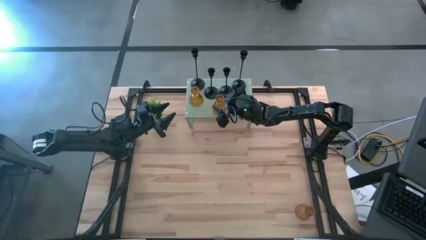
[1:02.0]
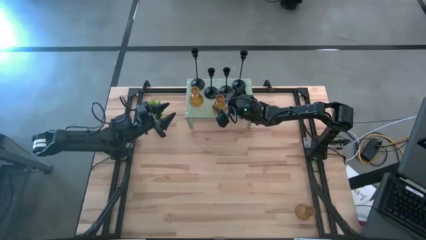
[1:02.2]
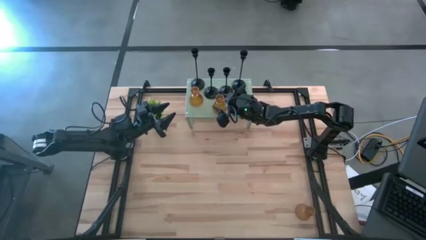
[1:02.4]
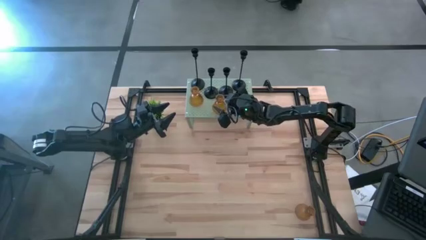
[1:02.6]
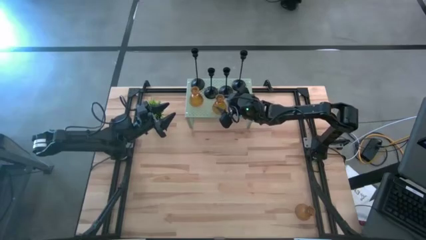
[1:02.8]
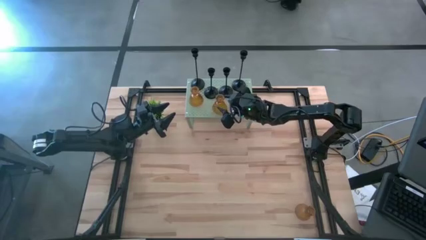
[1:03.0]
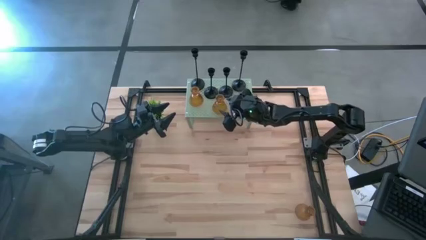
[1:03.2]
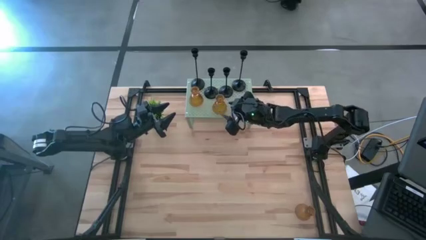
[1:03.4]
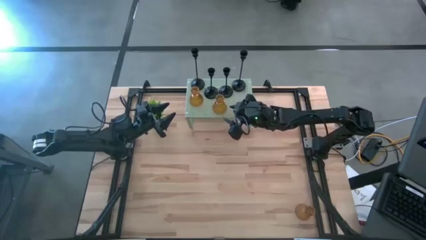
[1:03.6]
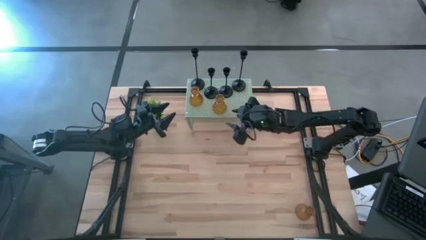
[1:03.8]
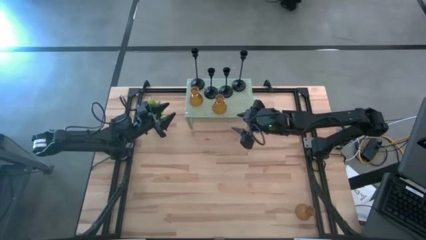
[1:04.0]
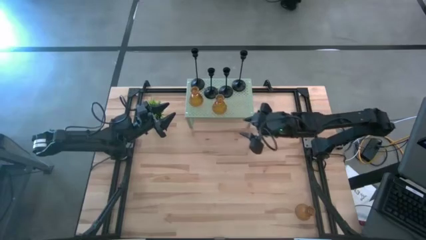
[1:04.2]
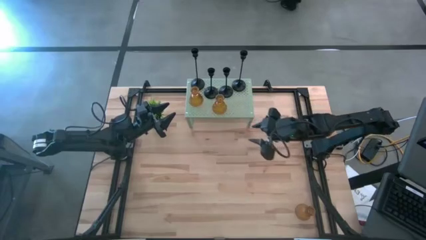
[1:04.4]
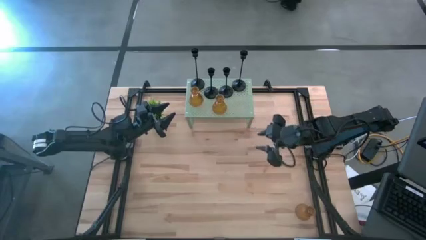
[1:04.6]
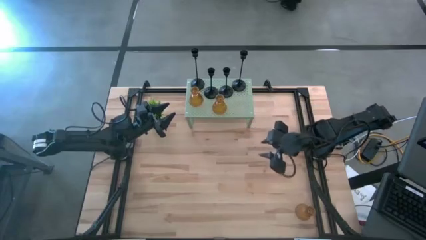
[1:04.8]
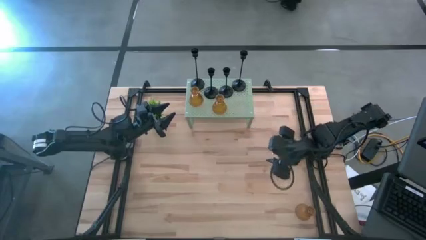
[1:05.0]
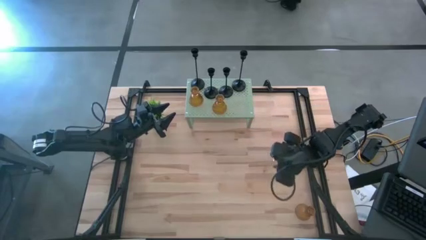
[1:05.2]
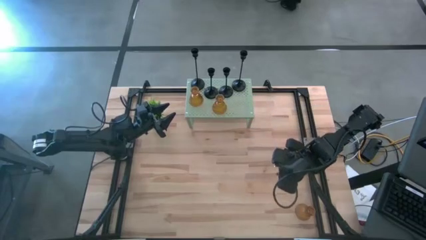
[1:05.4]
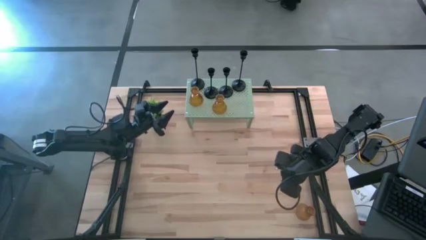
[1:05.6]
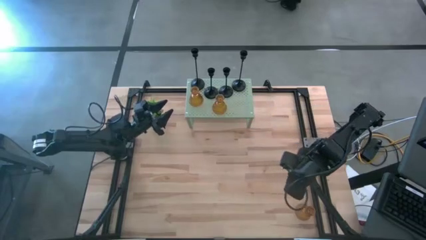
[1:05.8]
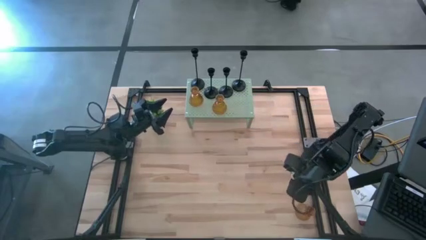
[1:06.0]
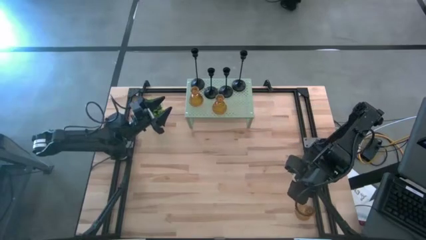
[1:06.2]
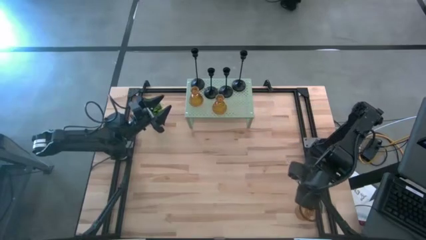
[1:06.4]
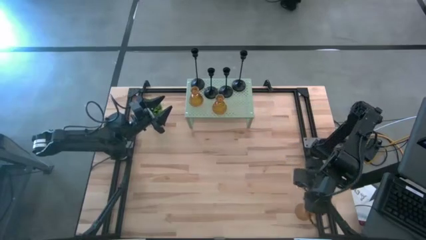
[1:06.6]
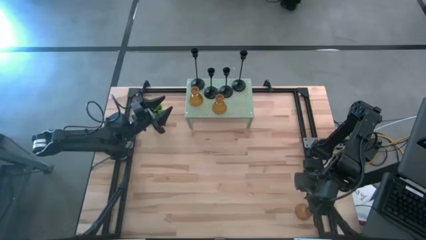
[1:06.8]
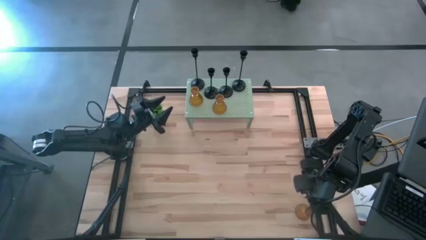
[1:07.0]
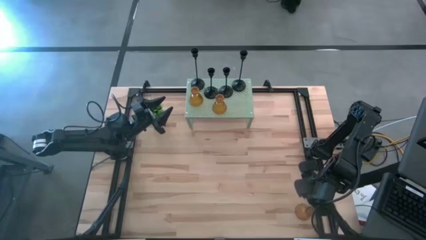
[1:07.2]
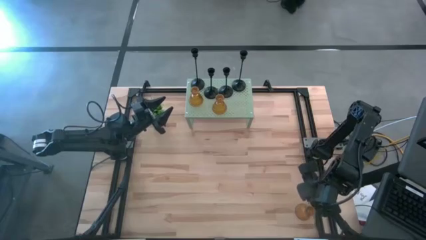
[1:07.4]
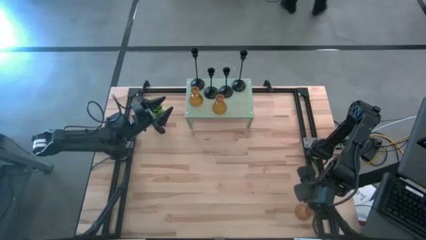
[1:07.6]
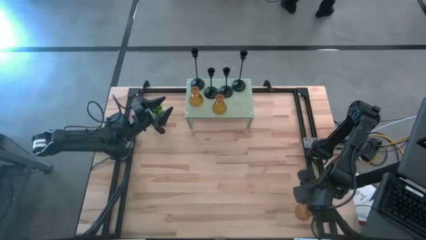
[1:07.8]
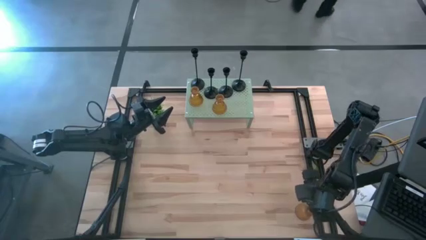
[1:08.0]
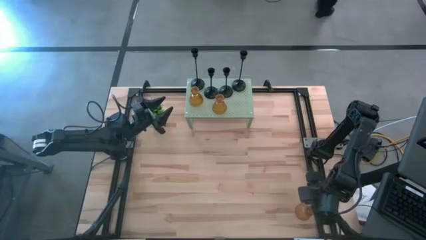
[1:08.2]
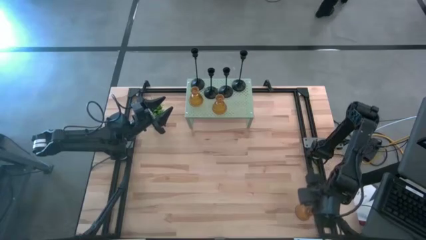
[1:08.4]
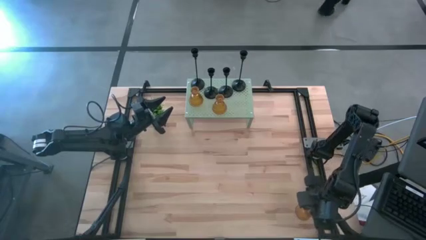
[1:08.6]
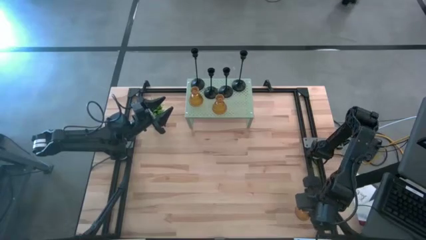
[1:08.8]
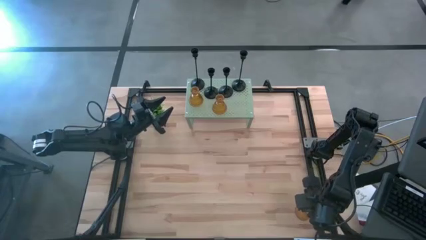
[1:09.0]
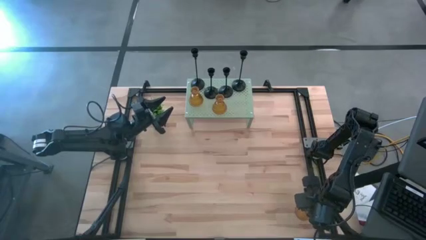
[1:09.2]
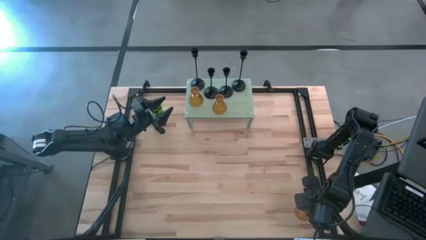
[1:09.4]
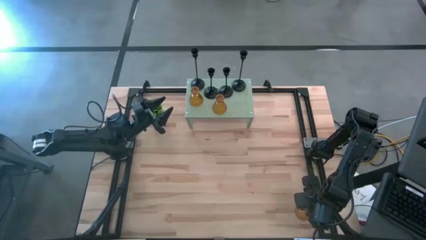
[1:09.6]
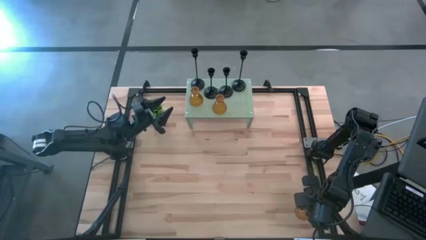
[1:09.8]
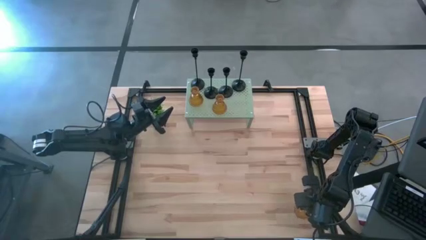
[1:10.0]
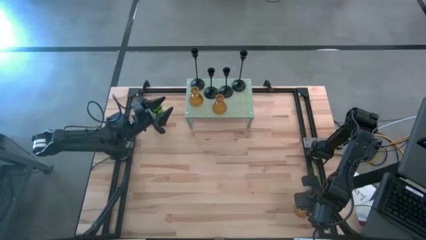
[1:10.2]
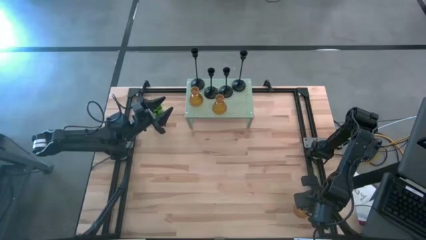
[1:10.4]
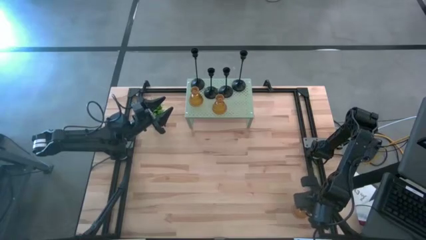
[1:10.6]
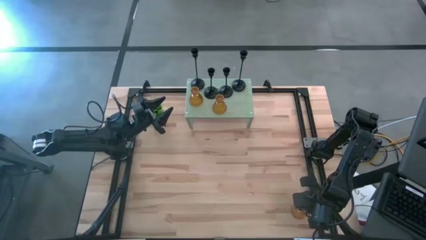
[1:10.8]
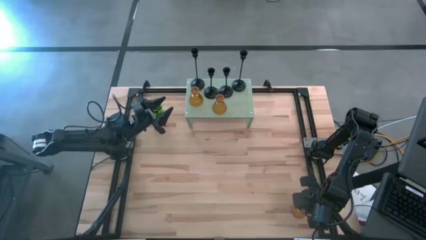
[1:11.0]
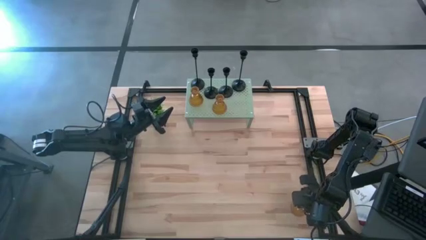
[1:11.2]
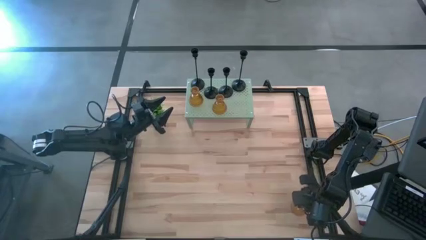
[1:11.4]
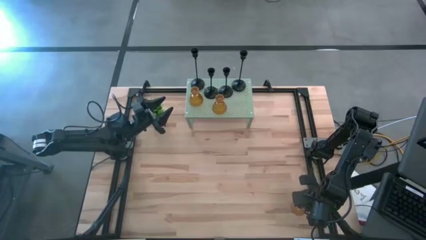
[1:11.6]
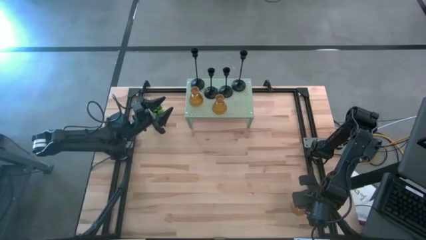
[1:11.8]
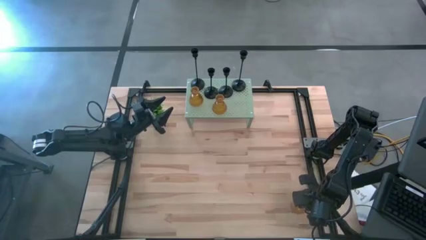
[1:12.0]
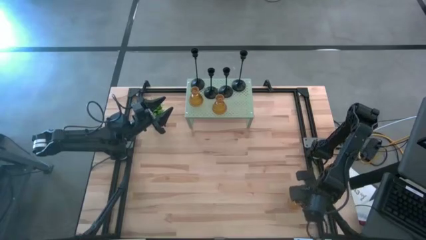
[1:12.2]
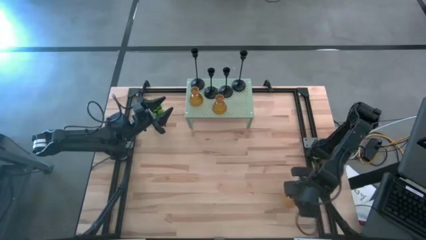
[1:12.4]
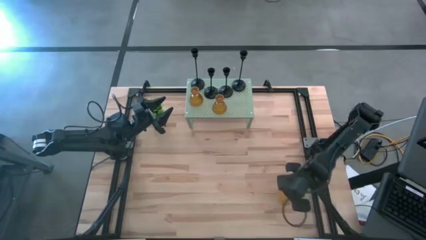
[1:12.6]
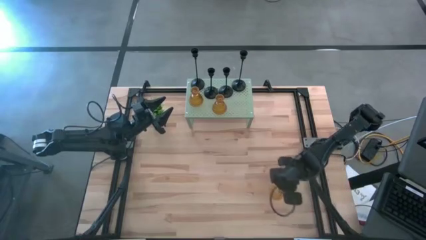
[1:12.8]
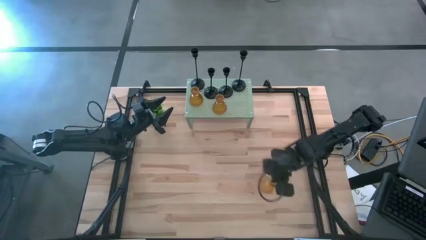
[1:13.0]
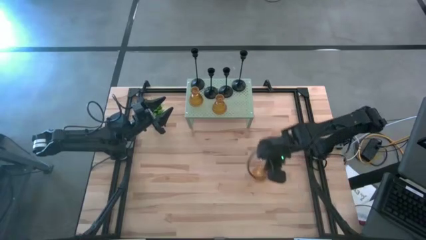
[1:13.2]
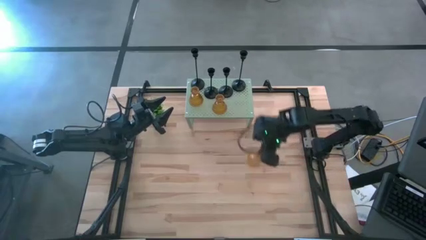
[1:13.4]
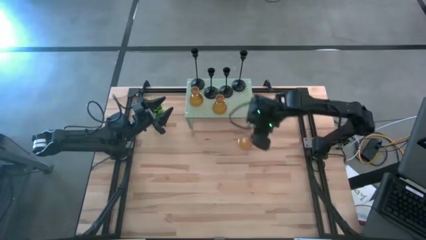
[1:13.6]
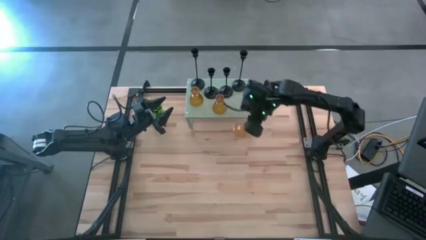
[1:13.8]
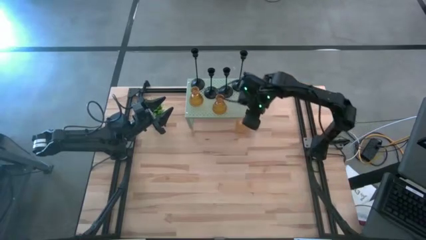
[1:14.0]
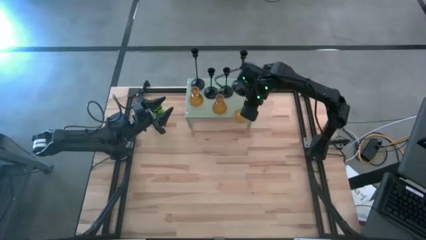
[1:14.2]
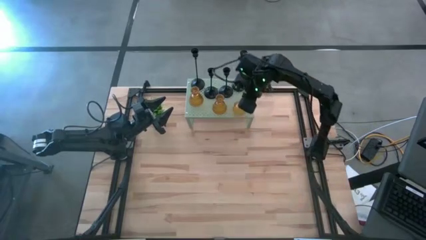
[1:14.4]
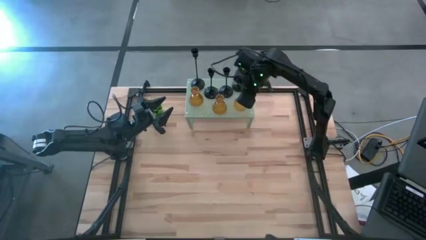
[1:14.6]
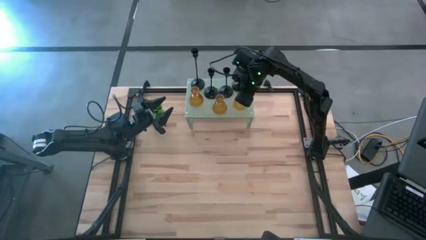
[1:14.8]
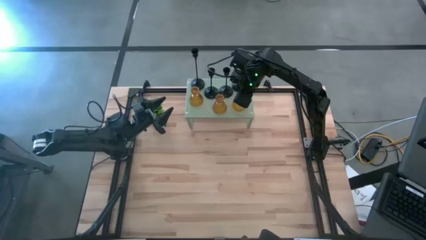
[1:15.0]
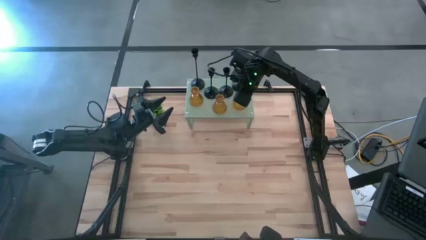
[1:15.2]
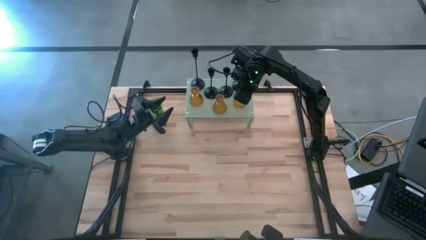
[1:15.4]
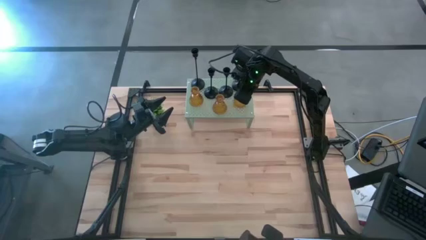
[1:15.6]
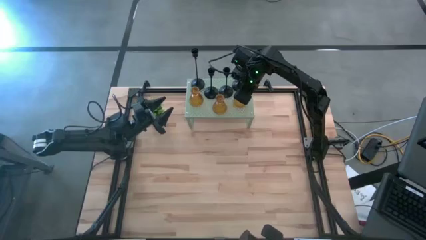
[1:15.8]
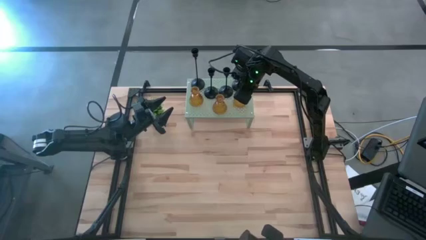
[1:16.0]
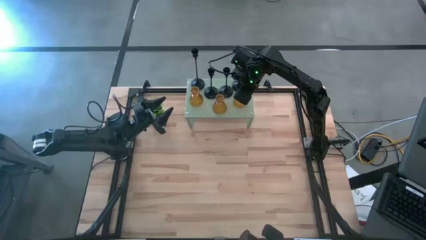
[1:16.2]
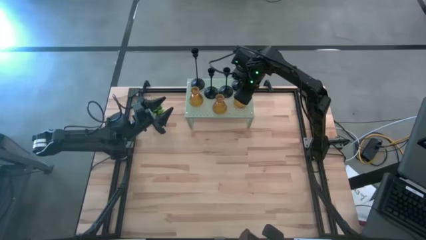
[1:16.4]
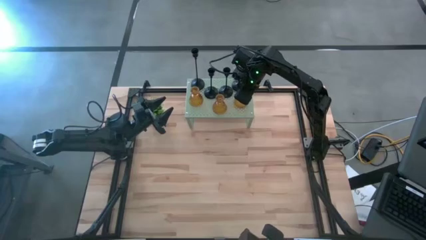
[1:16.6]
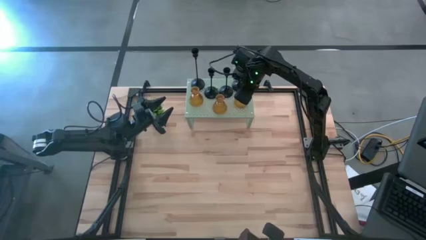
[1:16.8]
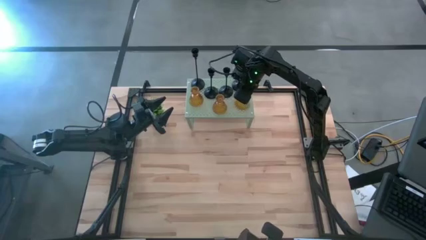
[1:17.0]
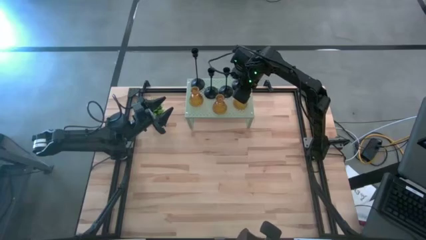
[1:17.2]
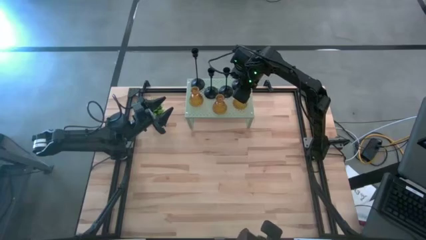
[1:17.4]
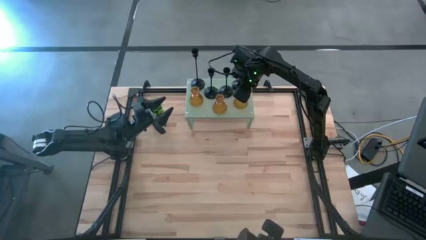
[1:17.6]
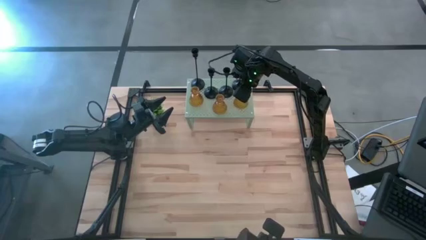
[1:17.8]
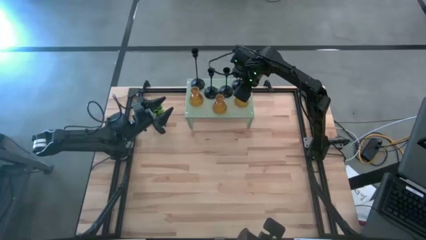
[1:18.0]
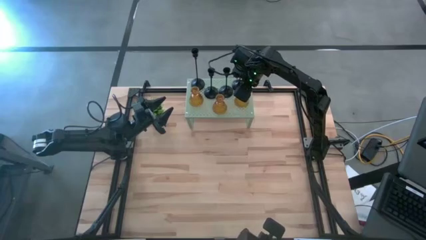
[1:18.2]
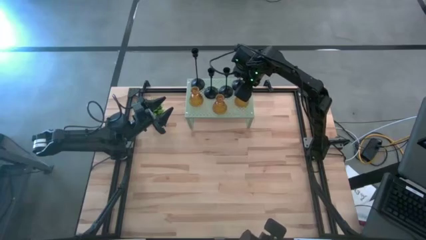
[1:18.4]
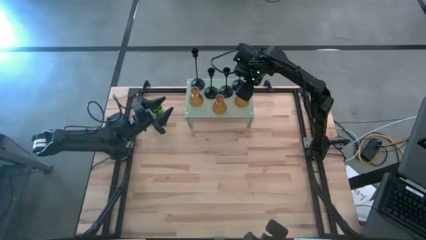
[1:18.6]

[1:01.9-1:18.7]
Task: Pick & Place candle stick holders
Put the orange glass candle holder on the shelf aligned with the other orange glass candle holders
